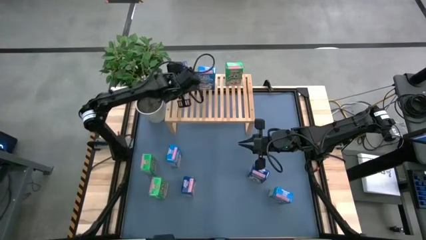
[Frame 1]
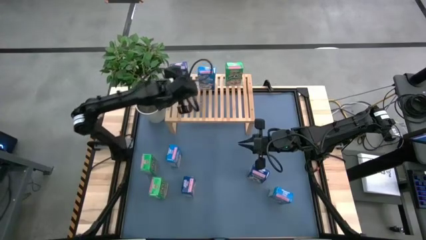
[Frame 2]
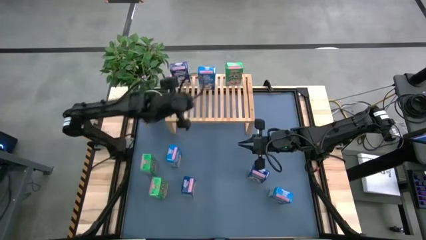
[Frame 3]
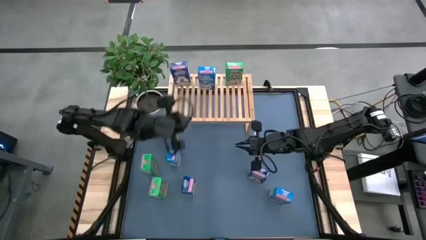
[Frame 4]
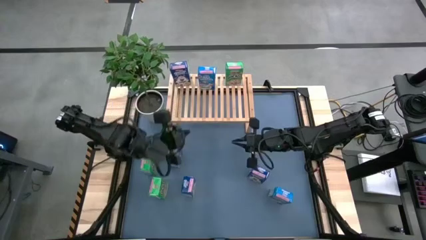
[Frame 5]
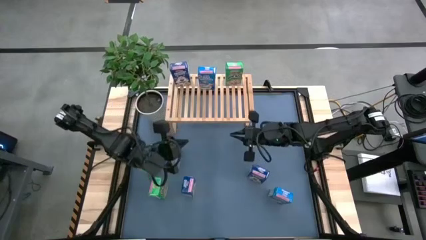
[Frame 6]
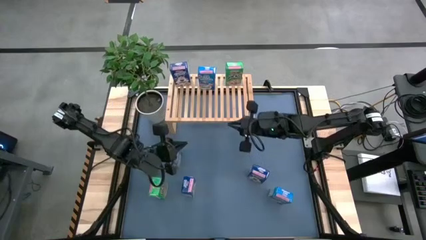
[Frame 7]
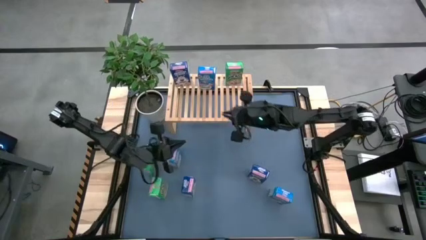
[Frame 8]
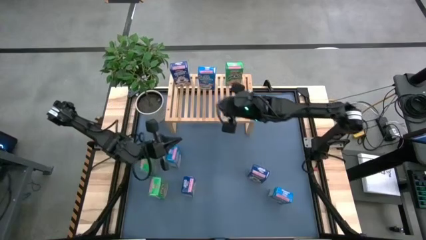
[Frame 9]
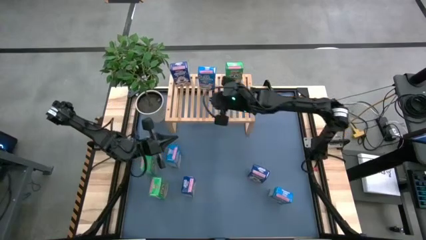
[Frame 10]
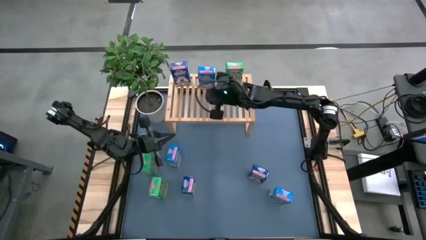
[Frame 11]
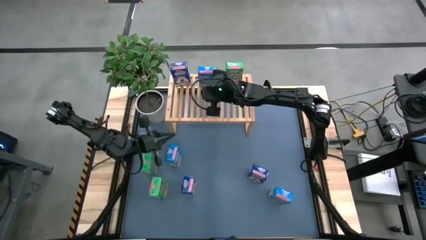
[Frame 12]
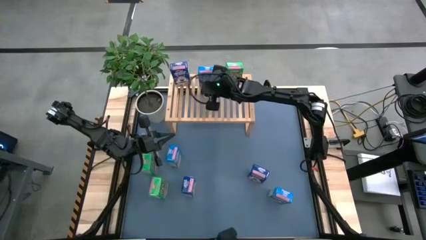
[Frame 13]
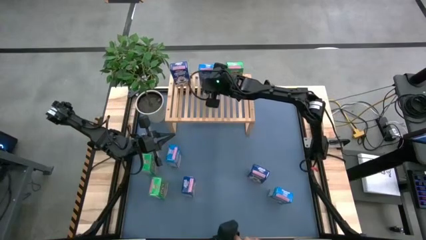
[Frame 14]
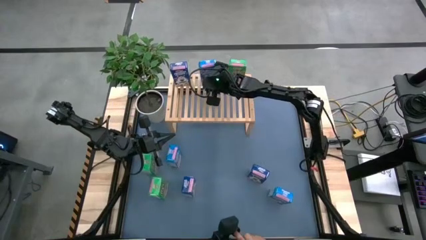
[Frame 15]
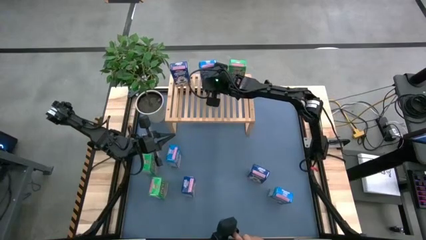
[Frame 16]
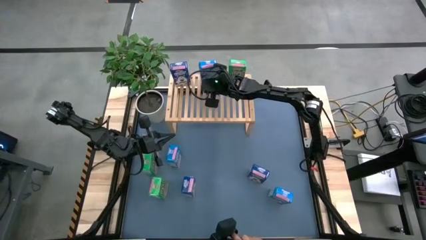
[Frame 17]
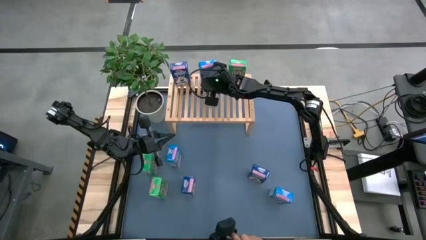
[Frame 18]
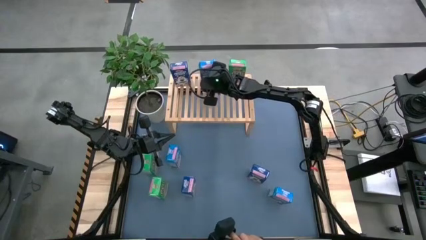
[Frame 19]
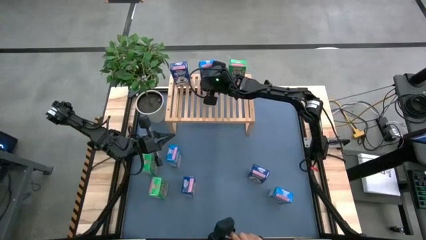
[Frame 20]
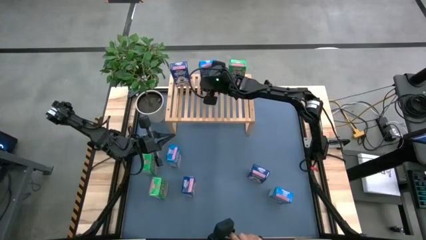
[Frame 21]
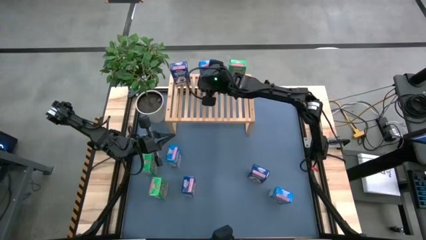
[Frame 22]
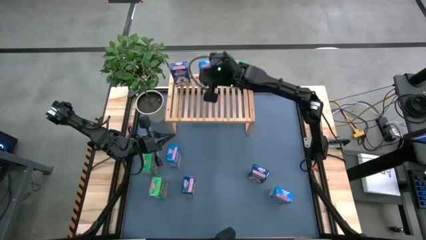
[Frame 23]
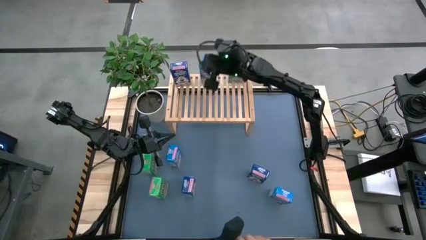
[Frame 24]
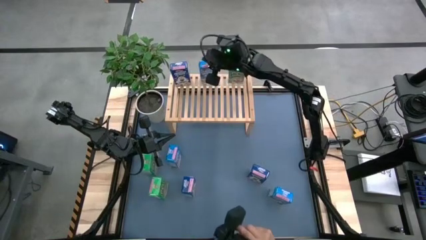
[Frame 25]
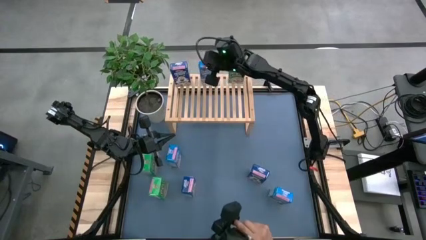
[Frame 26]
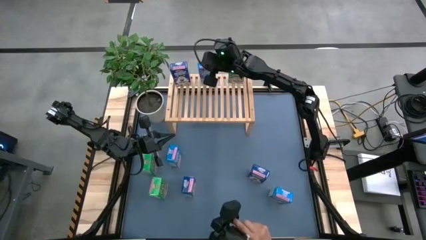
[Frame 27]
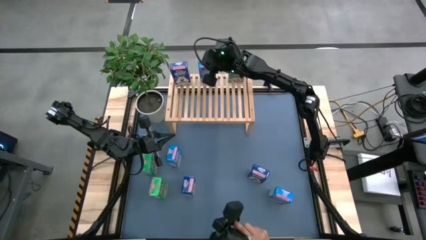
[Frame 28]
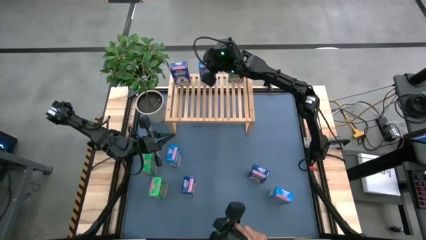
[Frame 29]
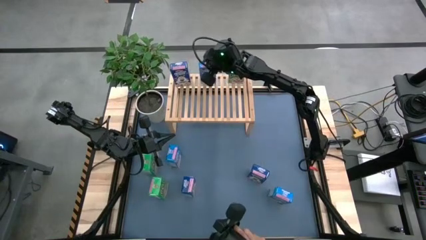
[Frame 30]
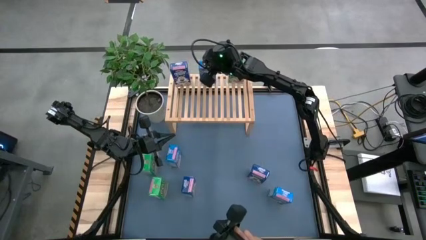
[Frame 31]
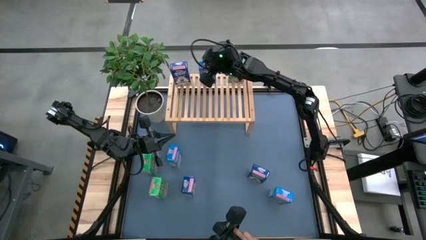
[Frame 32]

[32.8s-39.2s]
Task: Stack cereal on shelf
Adjust the light blue cereal box on the shelf

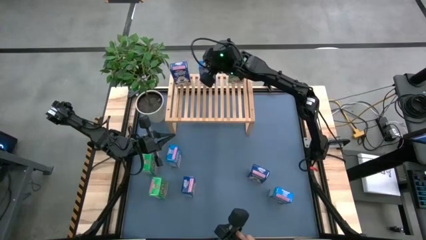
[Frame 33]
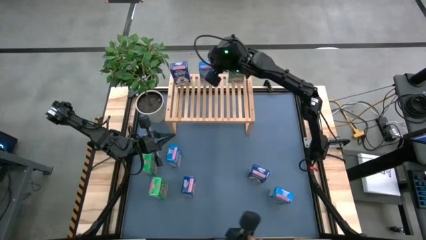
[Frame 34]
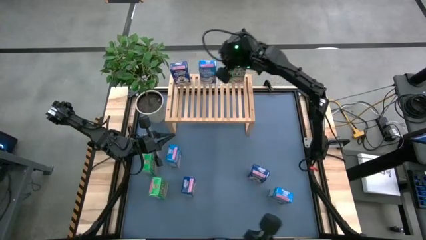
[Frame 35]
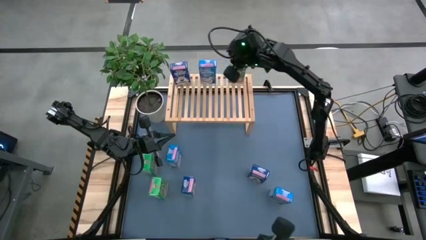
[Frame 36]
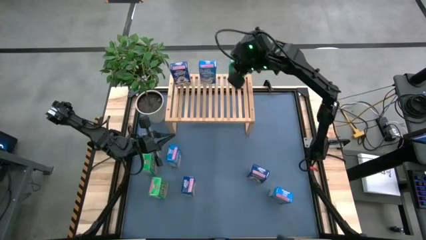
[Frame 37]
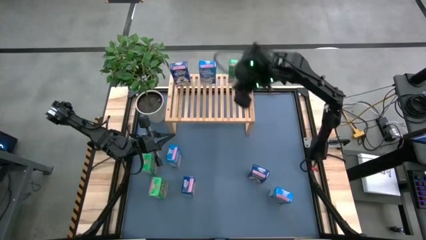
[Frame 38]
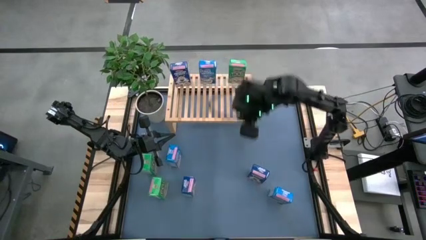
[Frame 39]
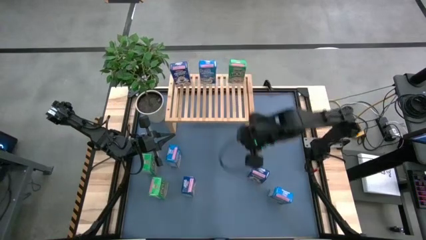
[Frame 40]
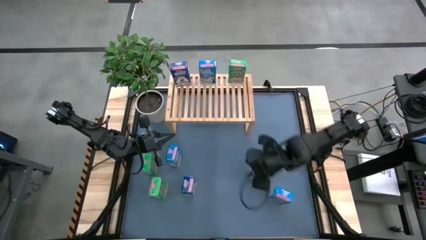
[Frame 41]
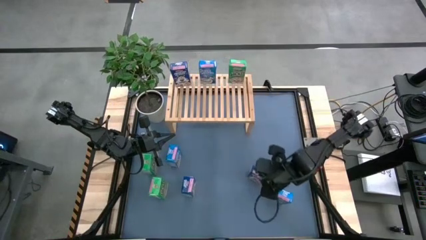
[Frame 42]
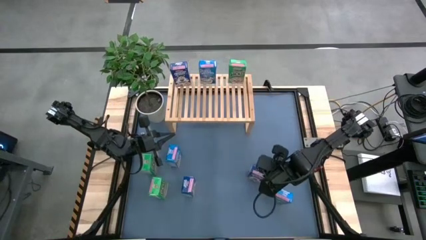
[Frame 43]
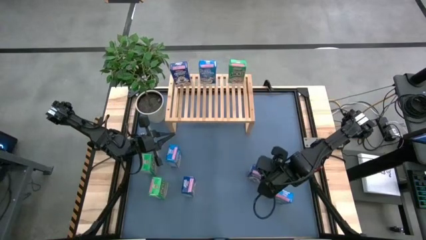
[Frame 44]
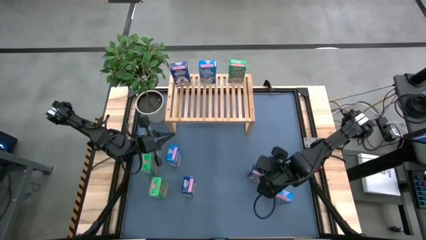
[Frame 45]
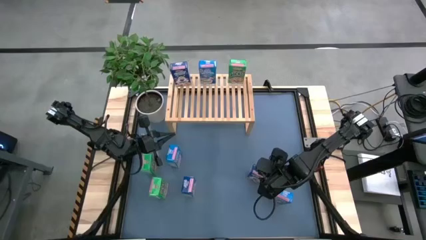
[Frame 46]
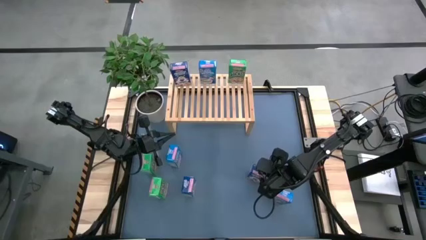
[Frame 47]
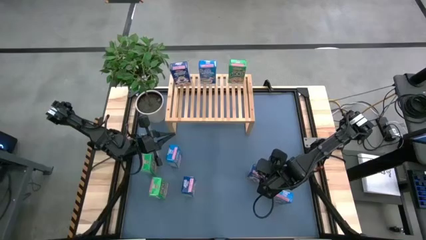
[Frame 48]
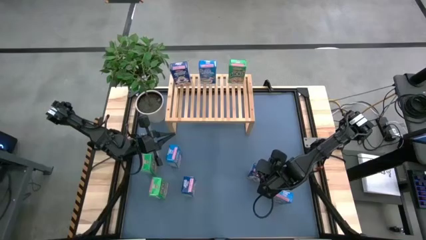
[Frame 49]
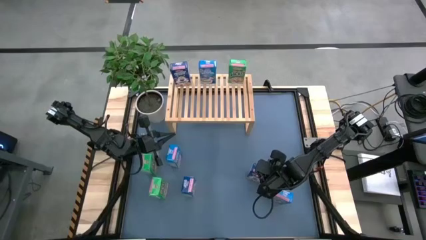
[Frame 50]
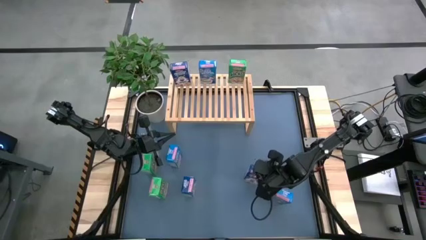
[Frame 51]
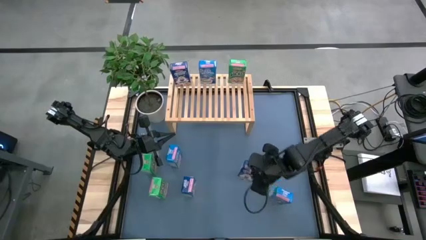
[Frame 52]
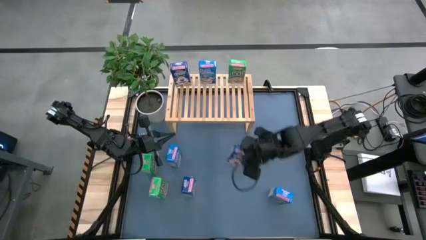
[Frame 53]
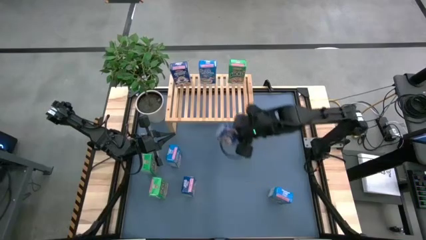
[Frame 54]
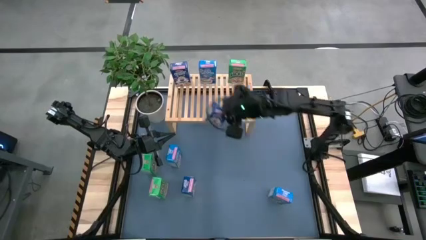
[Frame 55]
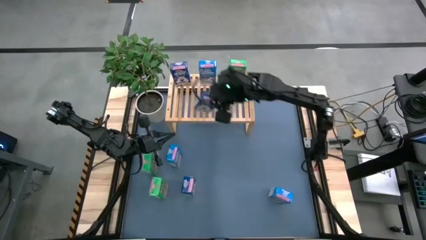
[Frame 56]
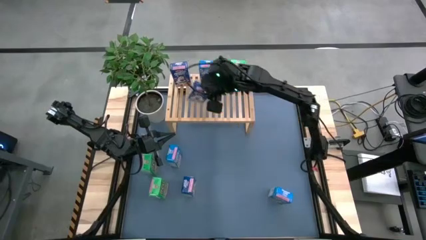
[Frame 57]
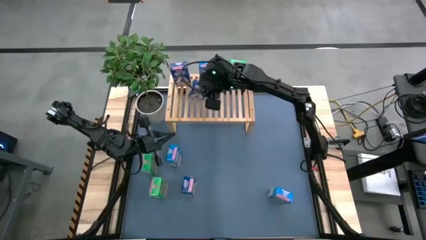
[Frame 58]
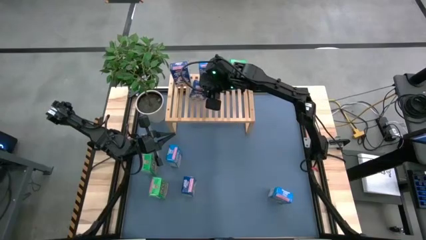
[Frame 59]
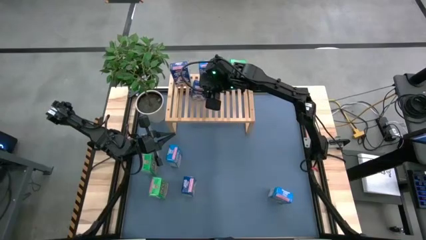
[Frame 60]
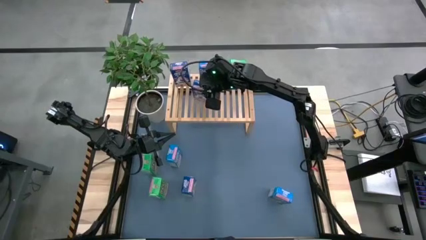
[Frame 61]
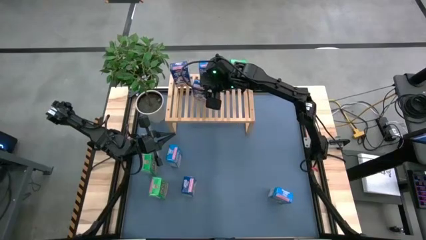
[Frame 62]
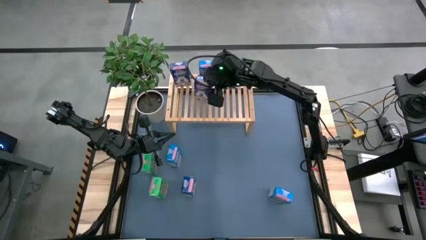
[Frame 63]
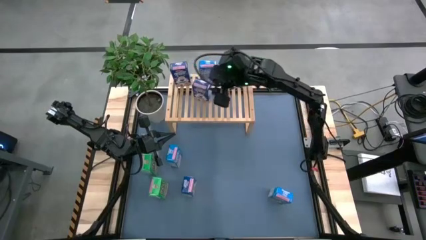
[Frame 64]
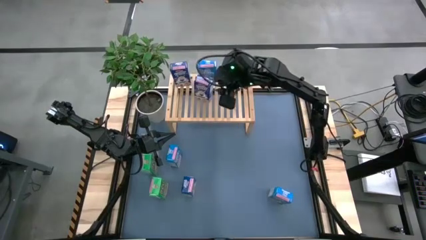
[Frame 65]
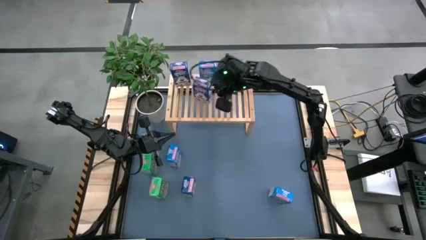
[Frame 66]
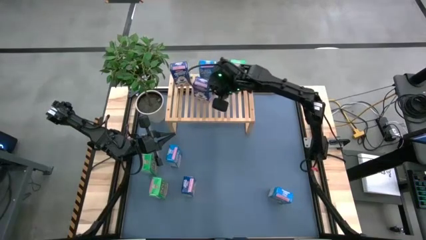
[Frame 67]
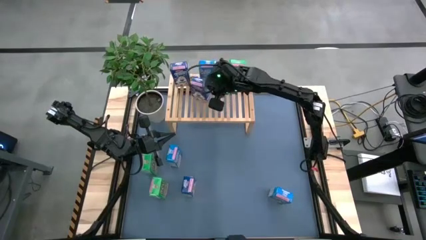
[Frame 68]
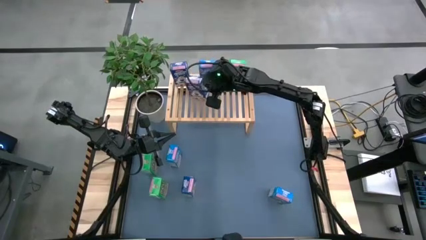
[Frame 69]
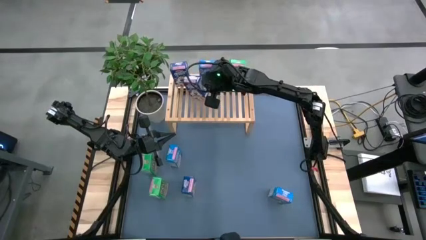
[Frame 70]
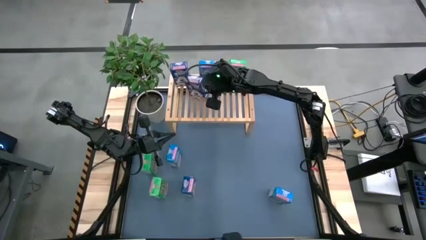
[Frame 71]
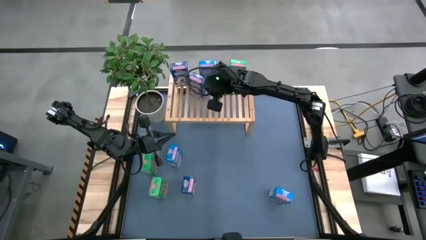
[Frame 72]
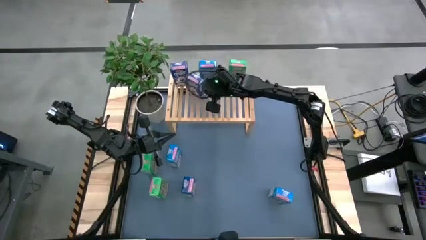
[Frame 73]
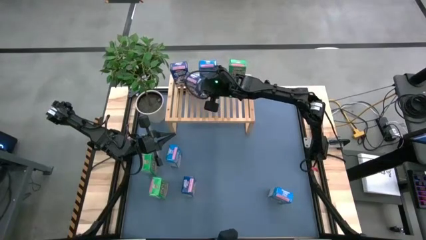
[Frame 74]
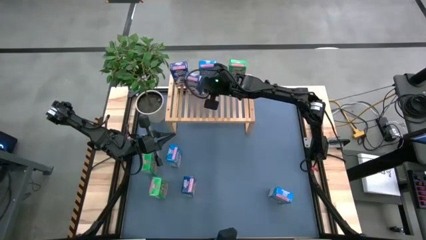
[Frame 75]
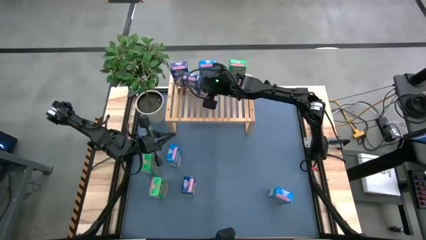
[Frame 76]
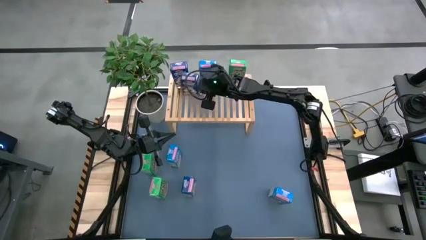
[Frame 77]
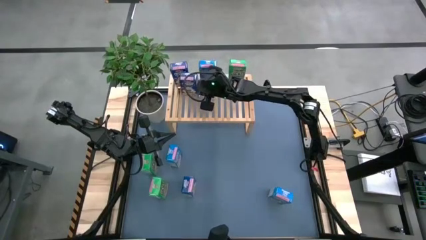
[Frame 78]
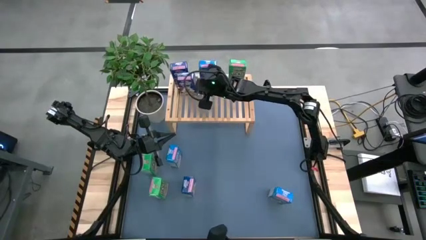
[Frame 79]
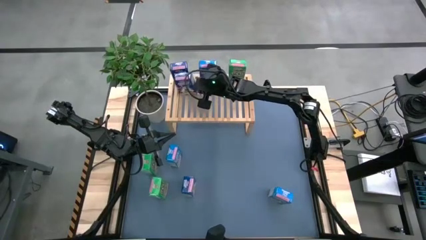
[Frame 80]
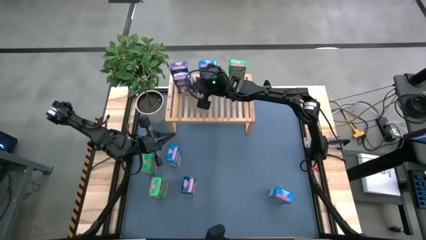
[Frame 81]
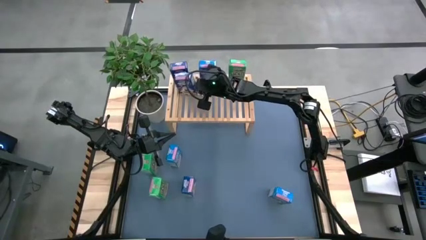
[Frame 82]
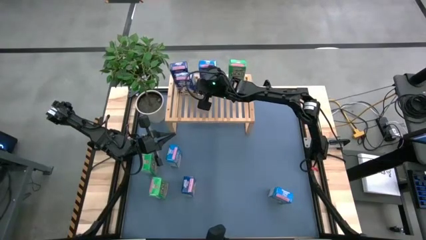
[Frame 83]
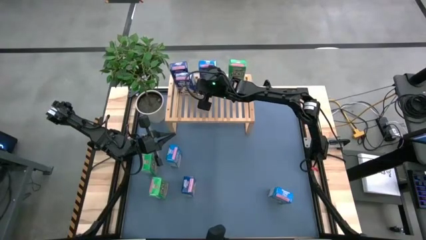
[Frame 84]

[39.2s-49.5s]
Put the right blue cereal box on the shelf aligned with the blue cereal box
